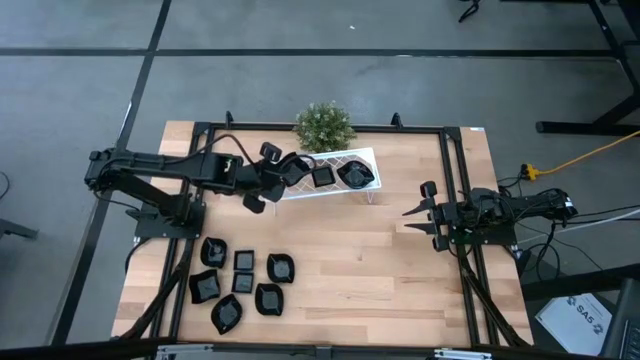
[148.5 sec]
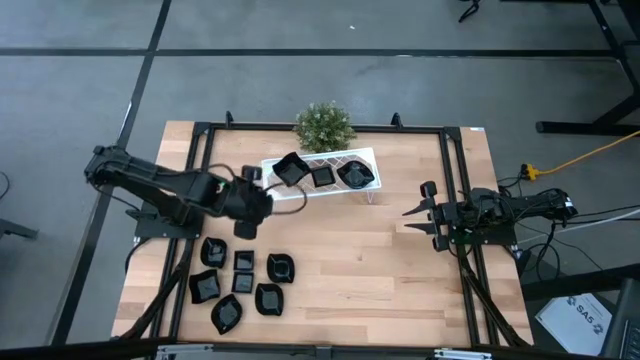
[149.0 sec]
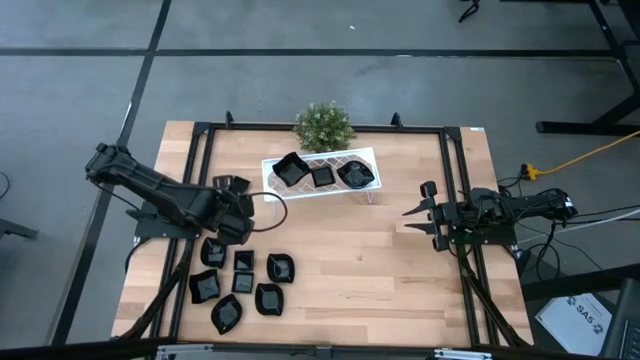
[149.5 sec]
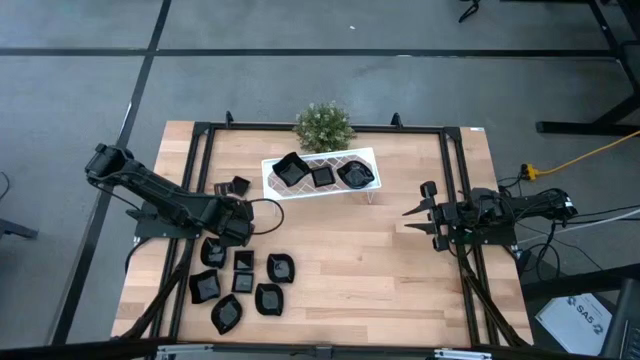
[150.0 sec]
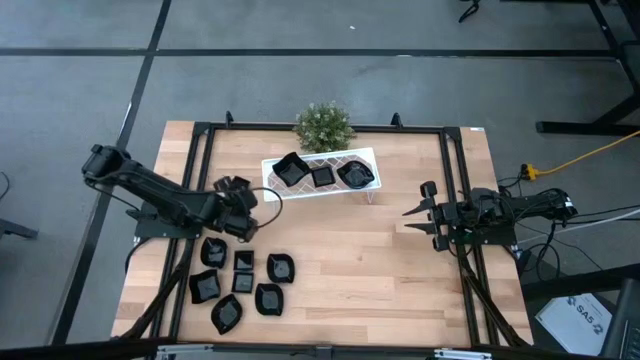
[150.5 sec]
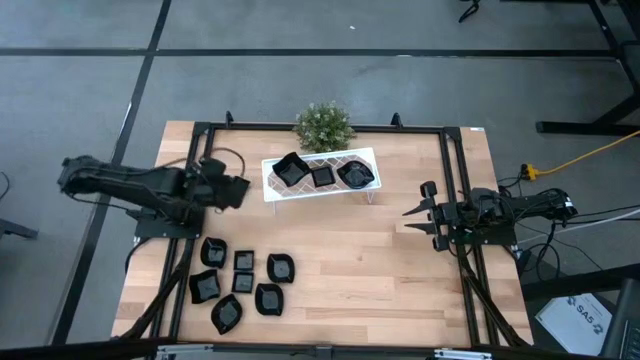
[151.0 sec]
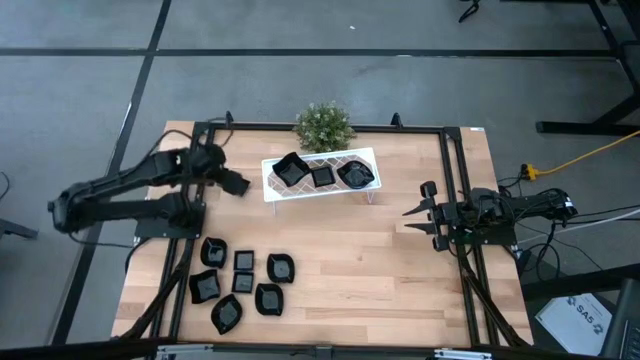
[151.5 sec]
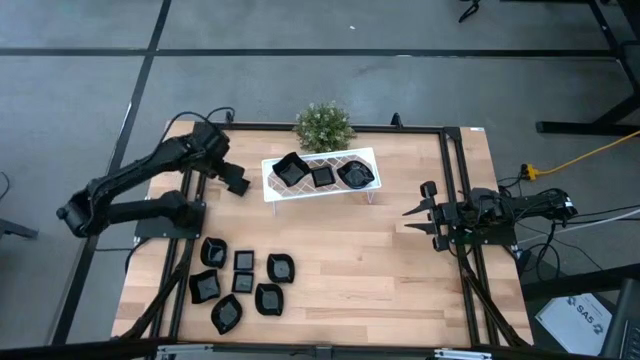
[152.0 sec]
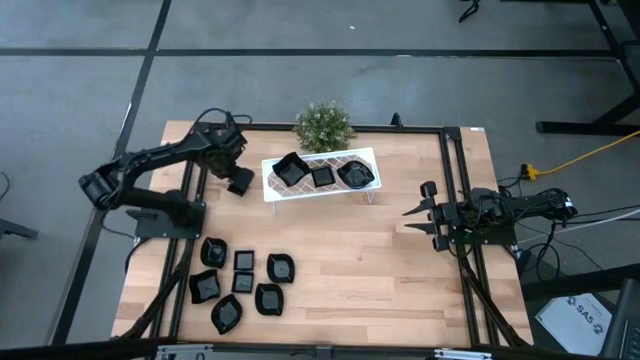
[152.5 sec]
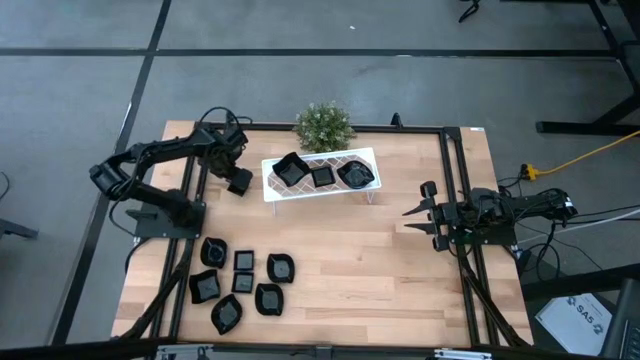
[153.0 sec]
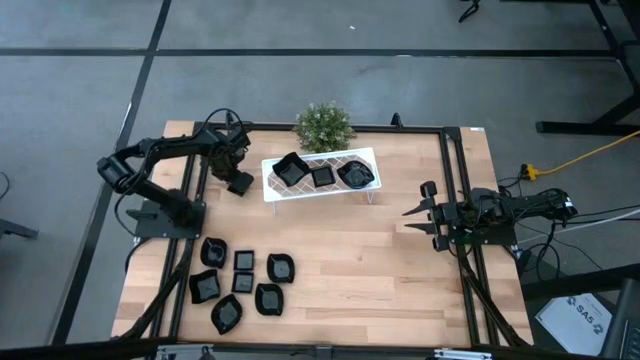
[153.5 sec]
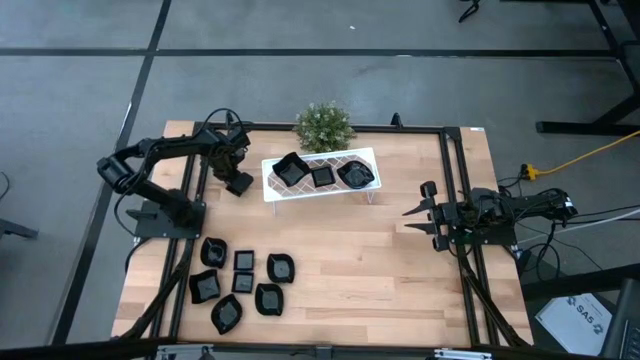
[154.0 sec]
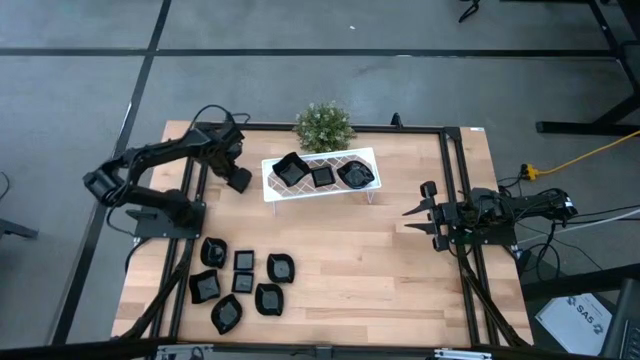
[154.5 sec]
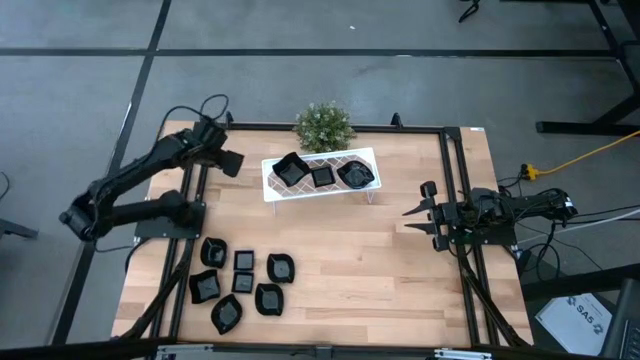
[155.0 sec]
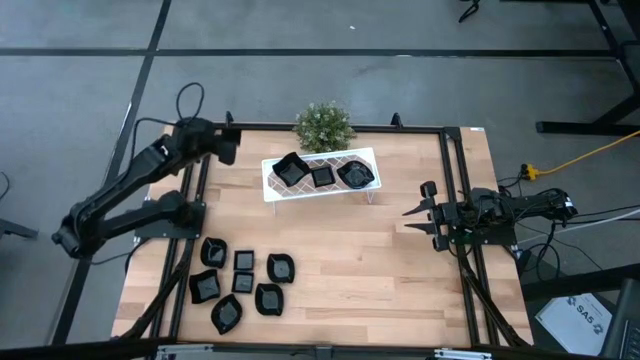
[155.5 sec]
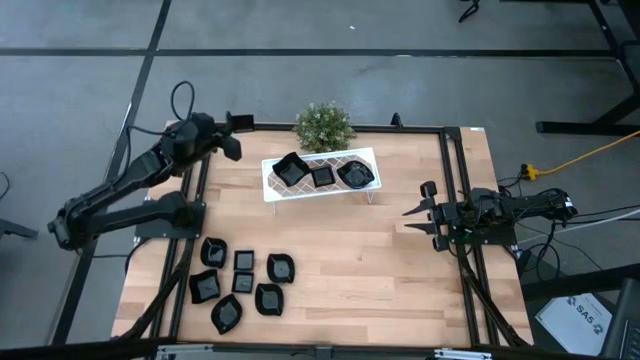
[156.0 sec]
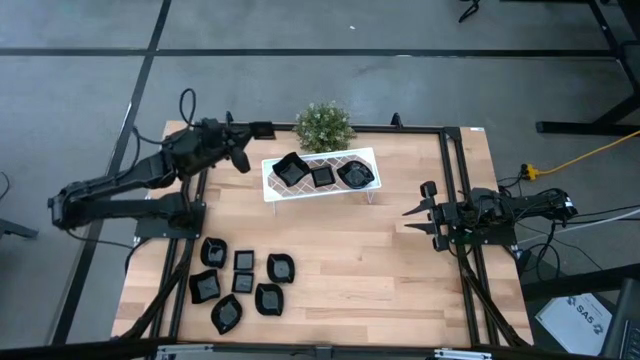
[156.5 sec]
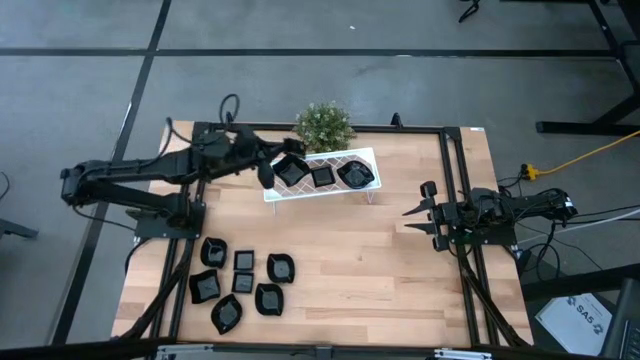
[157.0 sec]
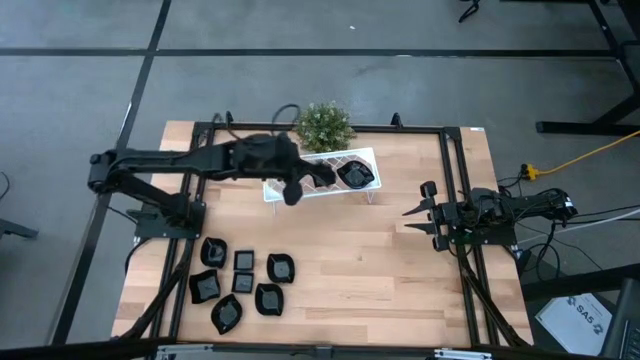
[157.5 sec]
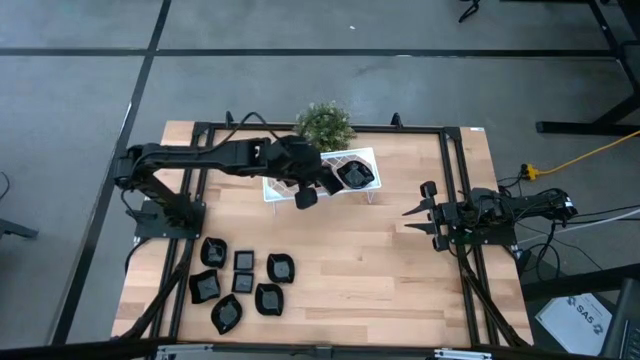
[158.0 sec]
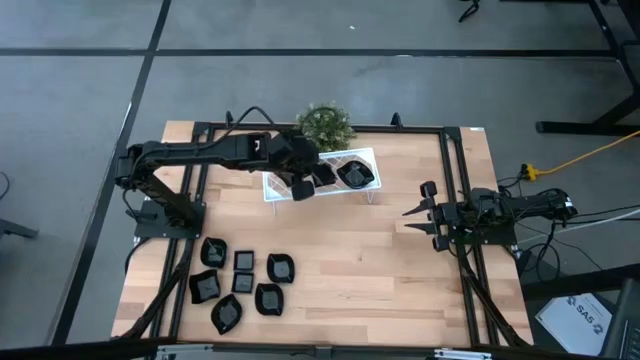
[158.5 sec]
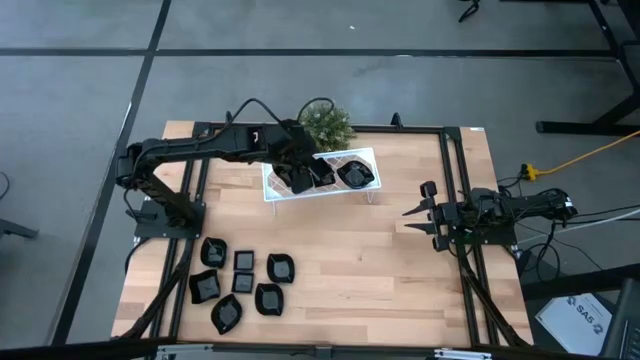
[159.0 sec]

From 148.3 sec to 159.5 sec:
Task: Pick & Place Mini shaped plates
Stack the square plate on top of the square plate on the shelf

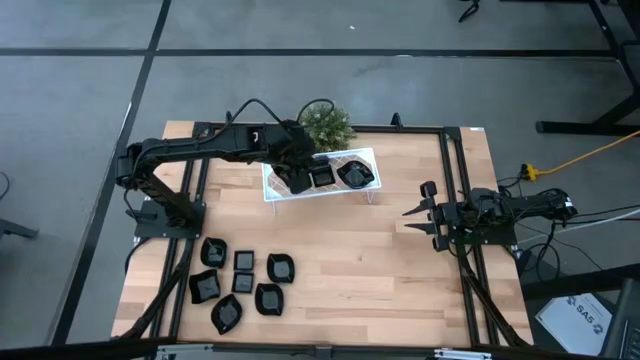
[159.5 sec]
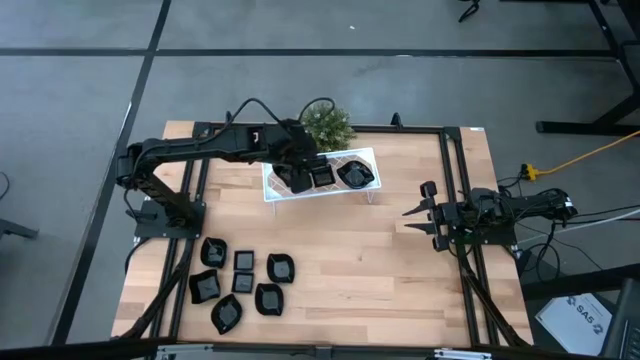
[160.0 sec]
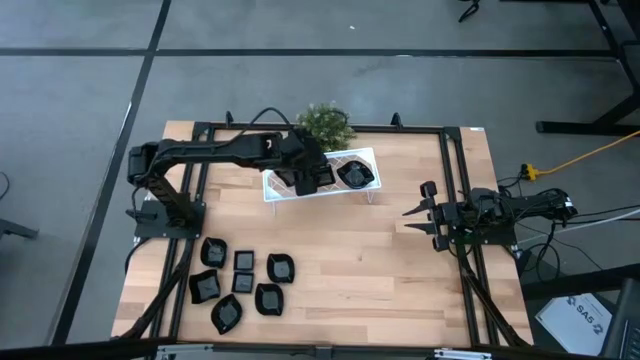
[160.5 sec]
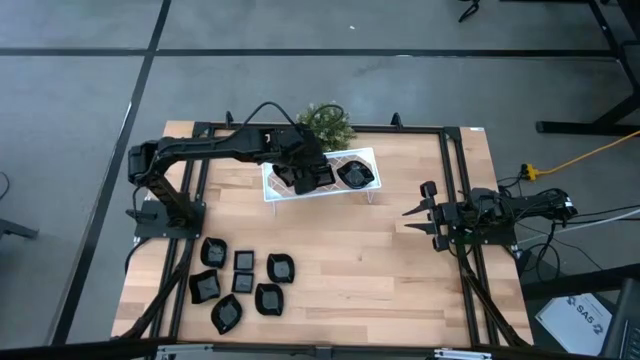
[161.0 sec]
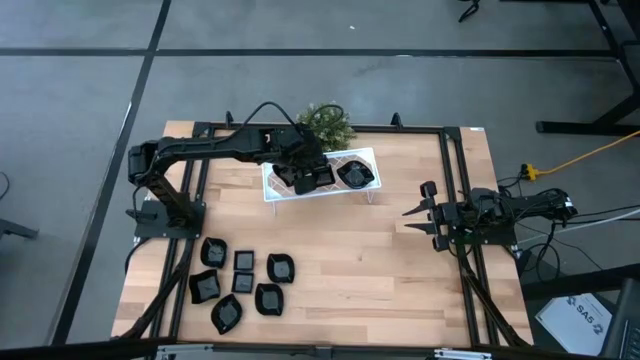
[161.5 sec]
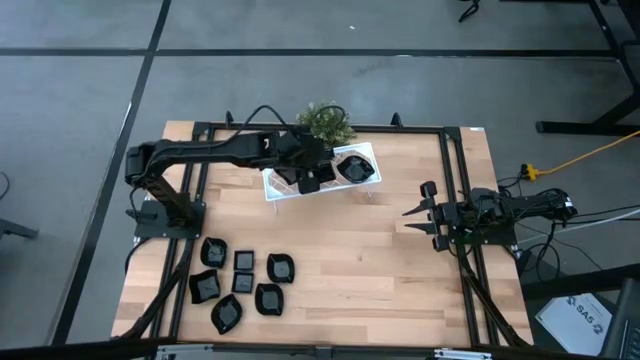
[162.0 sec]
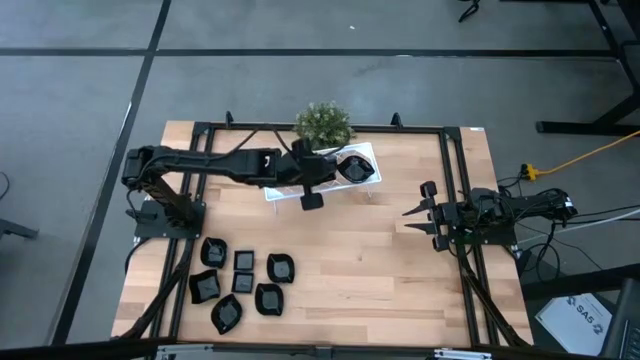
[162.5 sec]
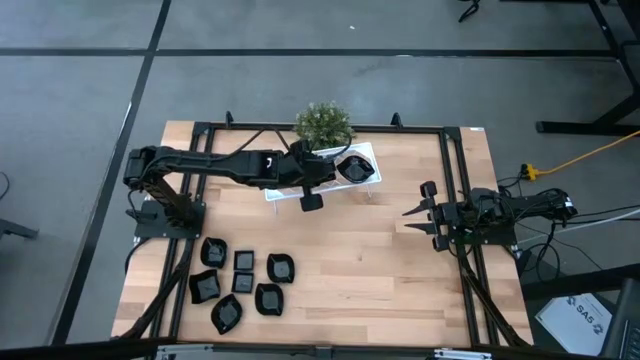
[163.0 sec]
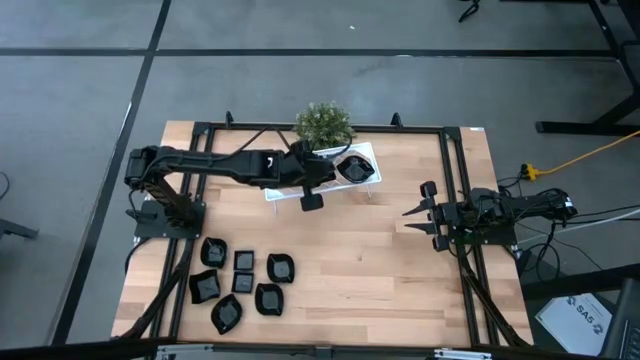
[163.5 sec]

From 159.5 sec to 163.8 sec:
Stack the square plate on top of the square plate on the shelf

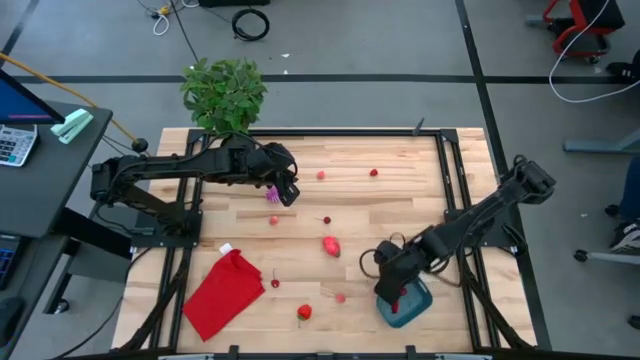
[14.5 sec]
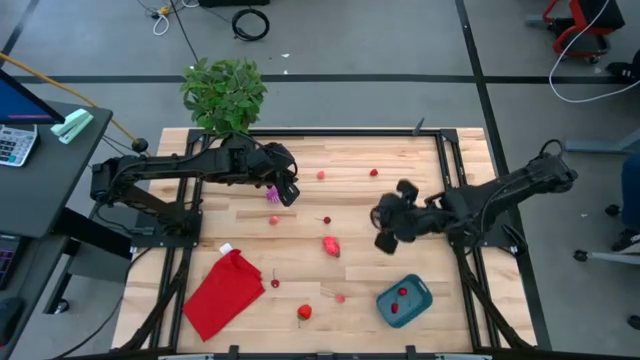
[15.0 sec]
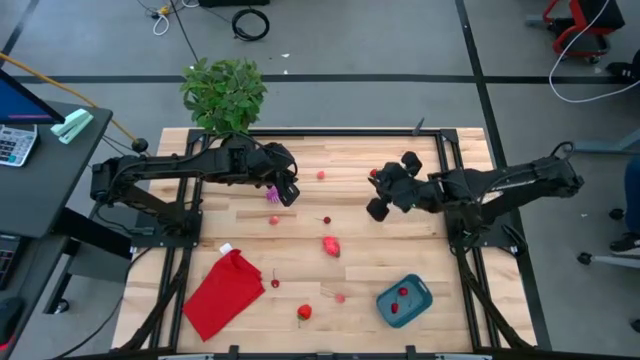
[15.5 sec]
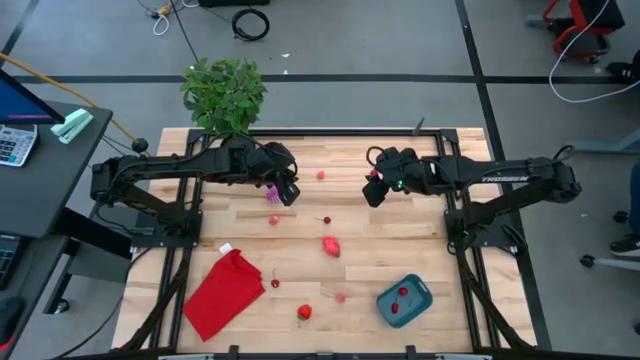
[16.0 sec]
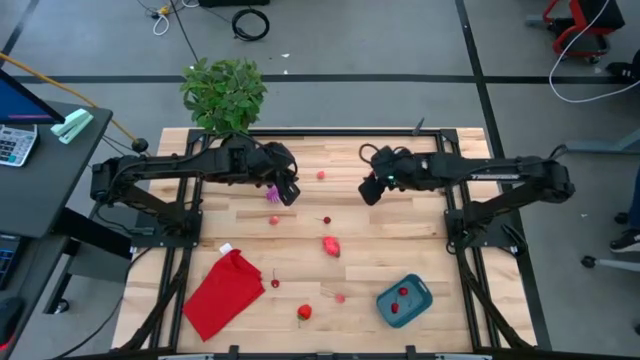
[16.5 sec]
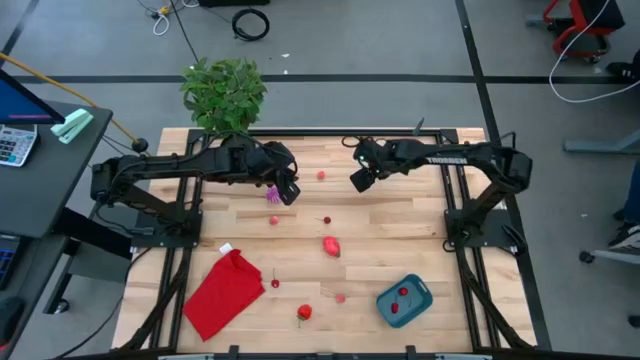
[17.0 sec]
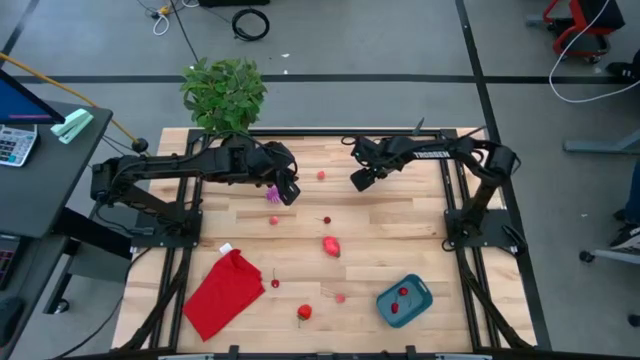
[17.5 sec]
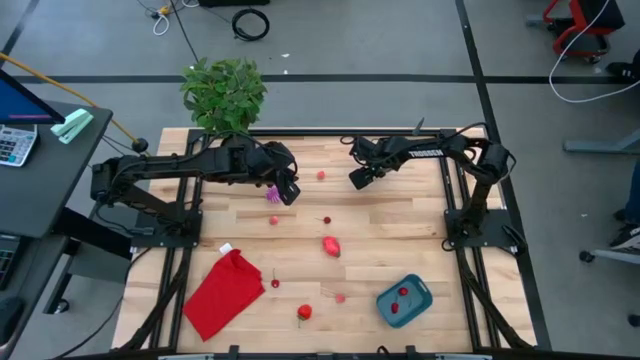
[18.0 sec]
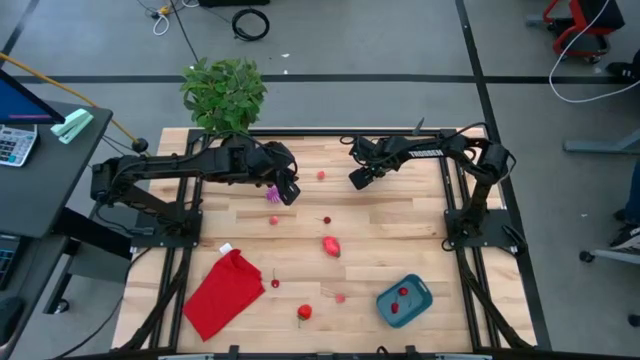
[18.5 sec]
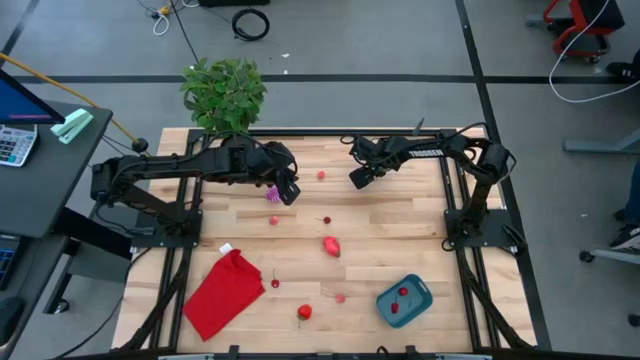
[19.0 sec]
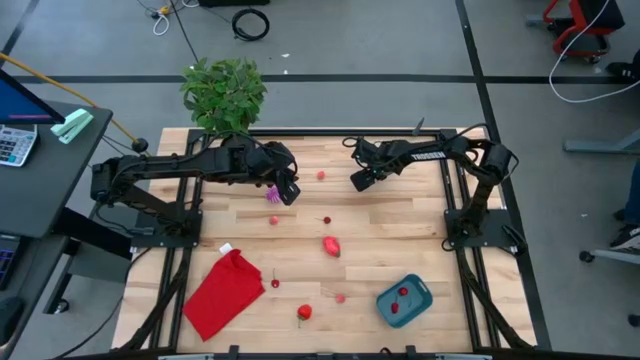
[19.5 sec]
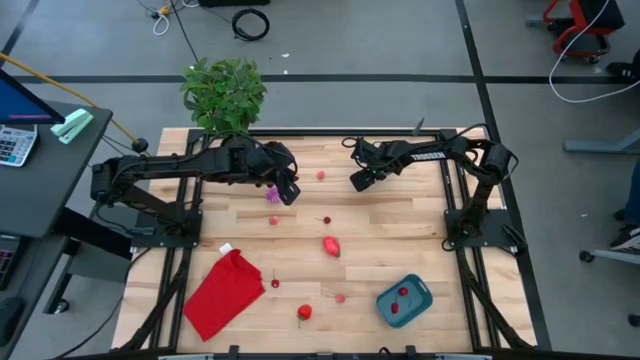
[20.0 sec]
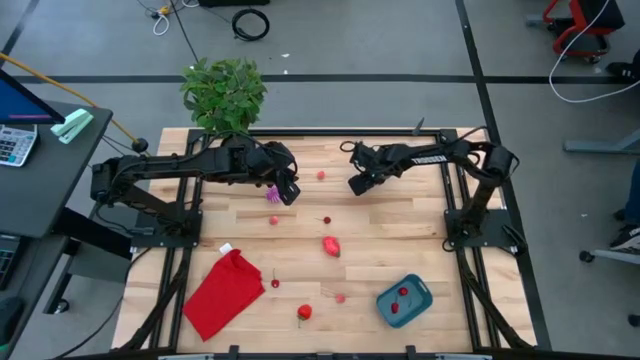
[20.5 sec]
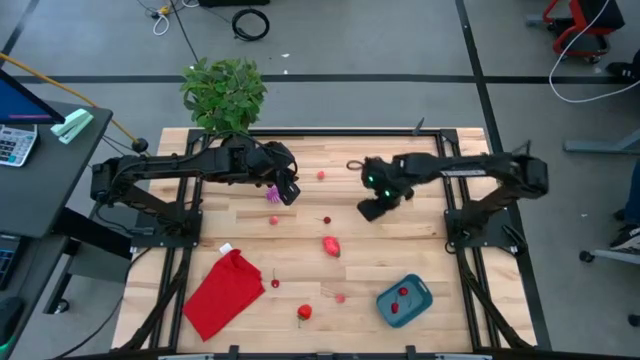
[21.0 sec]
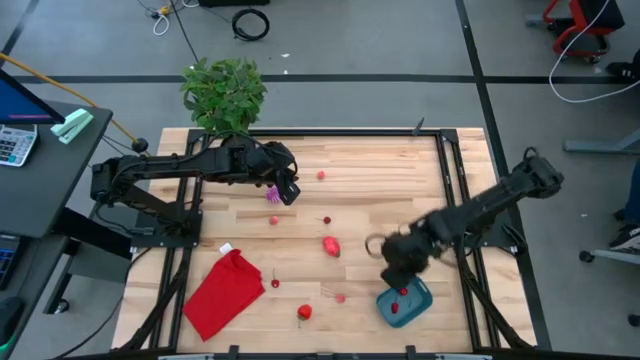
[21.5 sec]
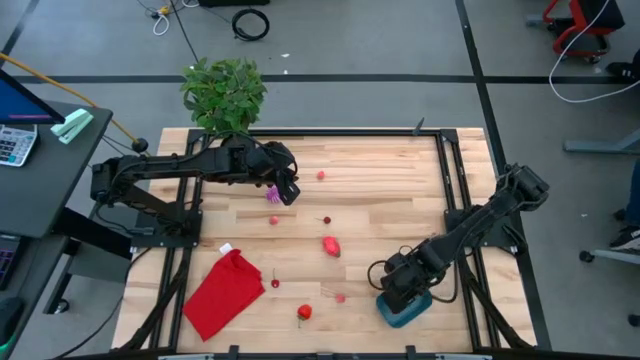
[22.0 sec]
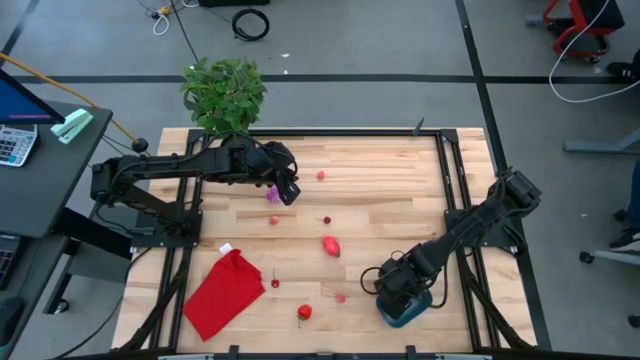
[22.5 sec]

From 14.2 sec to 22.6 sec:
Task: Pick and placing Produce into tupperware
Put the raspberry into the bin
